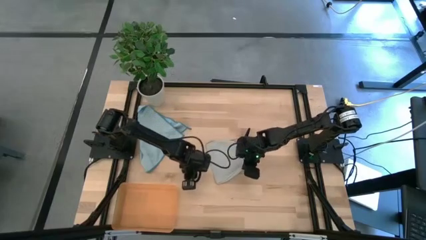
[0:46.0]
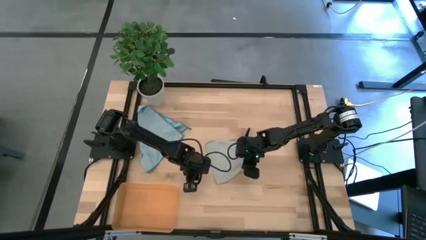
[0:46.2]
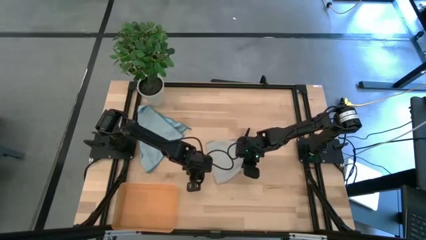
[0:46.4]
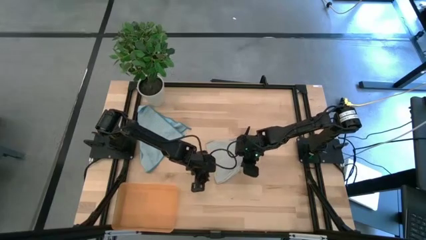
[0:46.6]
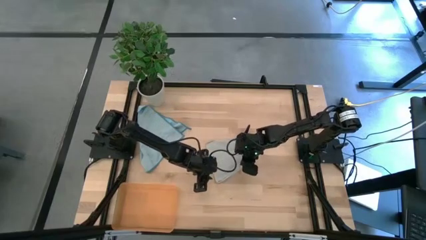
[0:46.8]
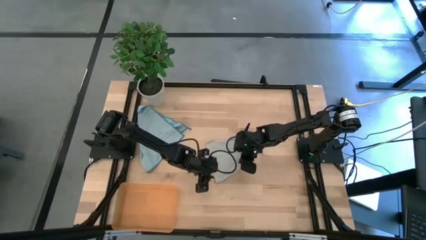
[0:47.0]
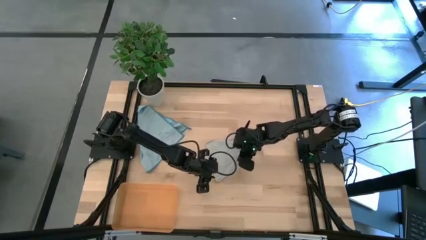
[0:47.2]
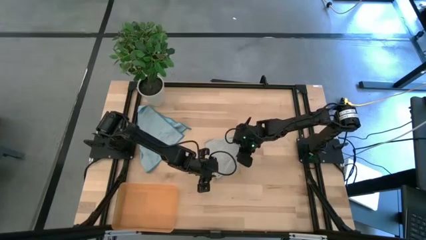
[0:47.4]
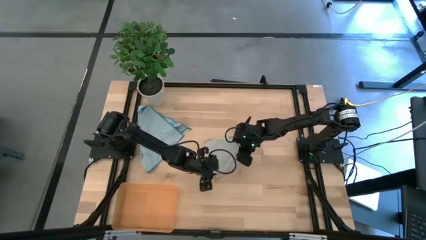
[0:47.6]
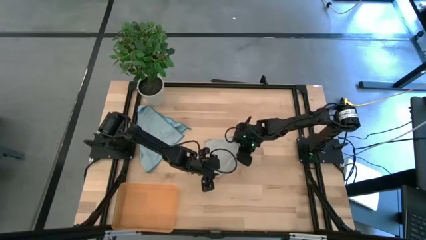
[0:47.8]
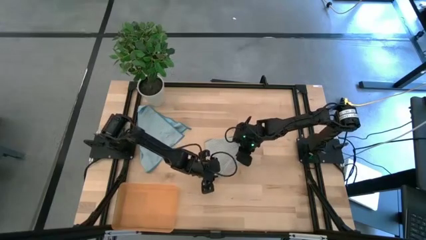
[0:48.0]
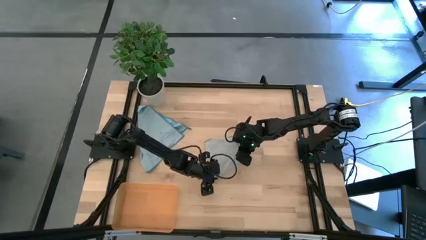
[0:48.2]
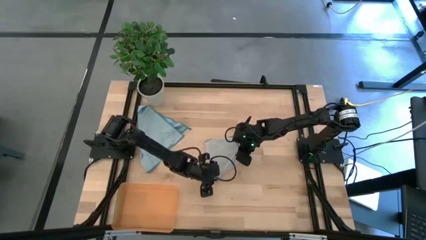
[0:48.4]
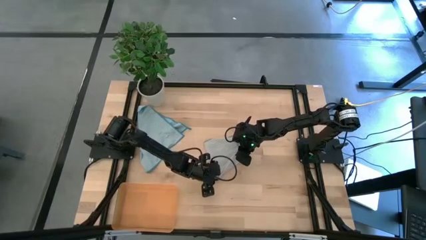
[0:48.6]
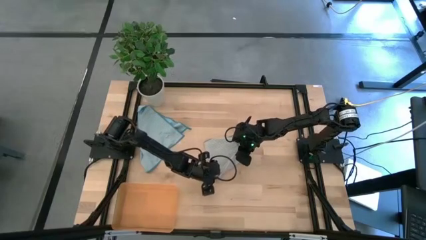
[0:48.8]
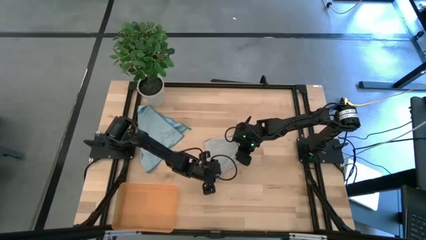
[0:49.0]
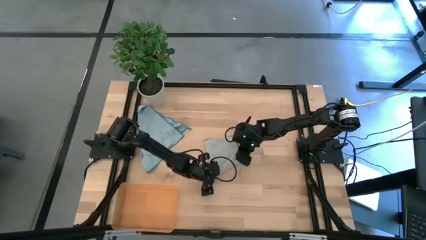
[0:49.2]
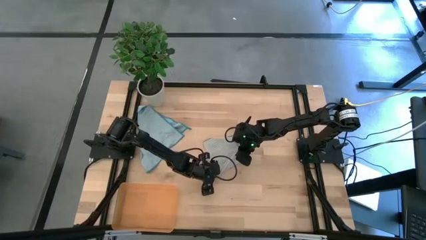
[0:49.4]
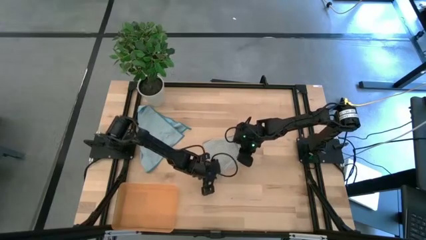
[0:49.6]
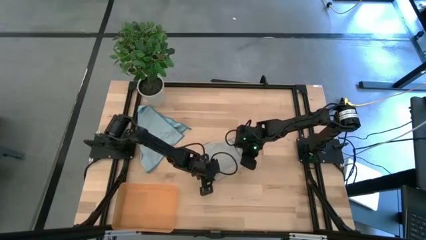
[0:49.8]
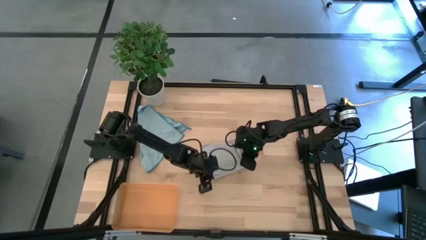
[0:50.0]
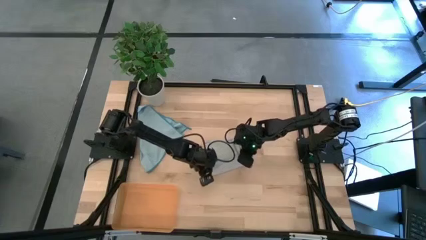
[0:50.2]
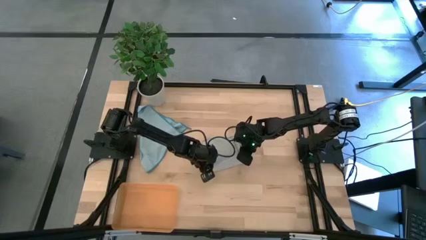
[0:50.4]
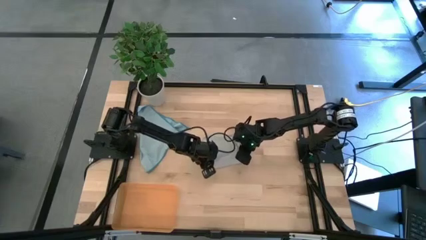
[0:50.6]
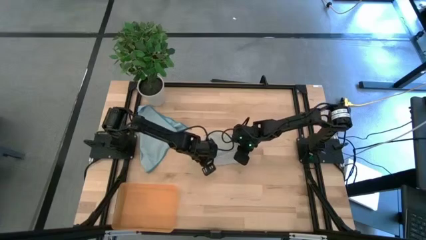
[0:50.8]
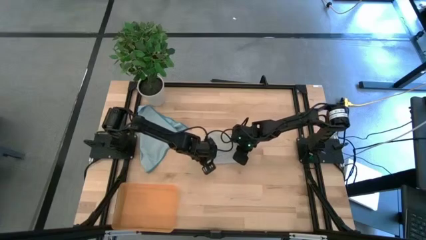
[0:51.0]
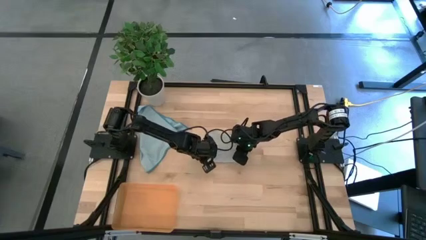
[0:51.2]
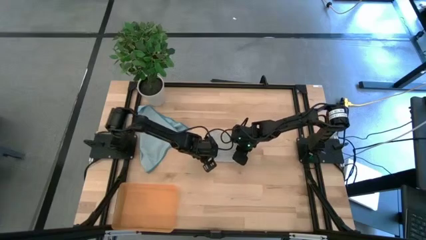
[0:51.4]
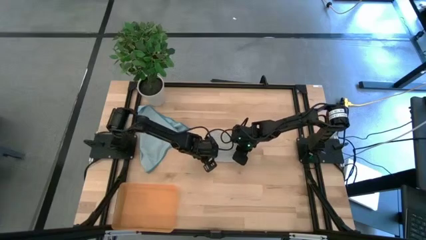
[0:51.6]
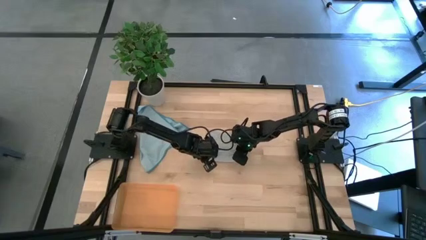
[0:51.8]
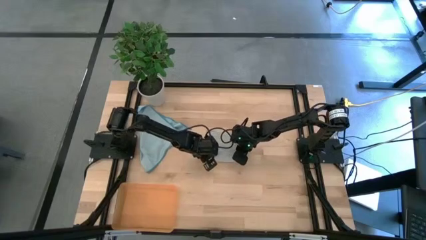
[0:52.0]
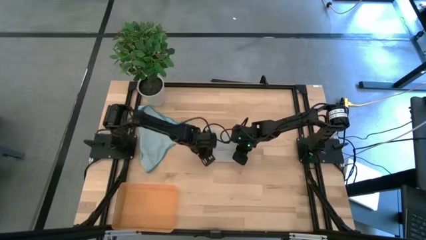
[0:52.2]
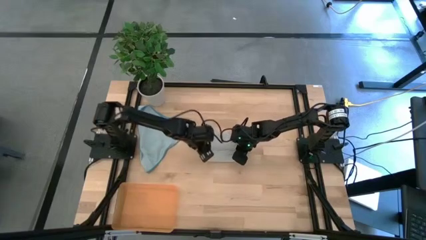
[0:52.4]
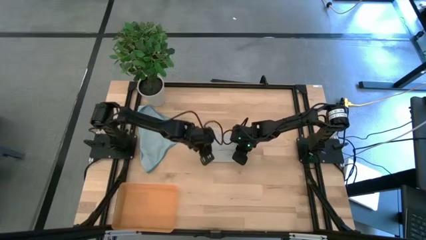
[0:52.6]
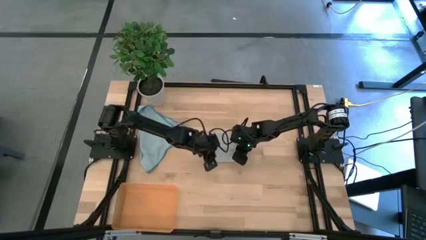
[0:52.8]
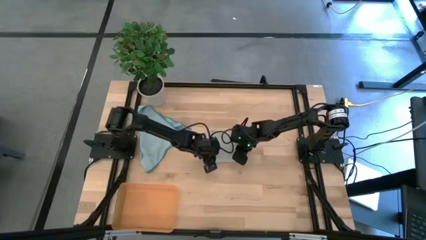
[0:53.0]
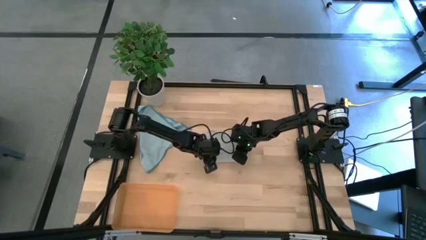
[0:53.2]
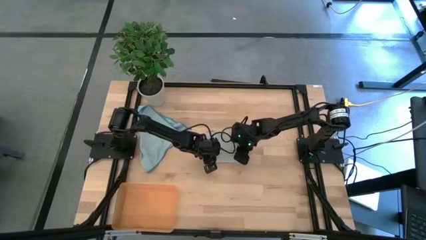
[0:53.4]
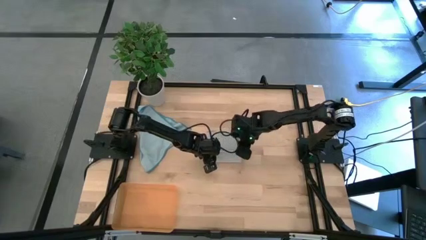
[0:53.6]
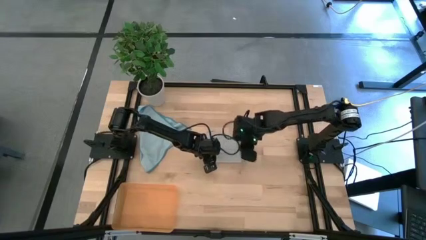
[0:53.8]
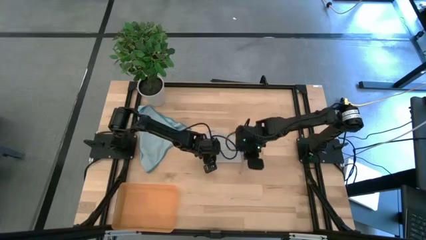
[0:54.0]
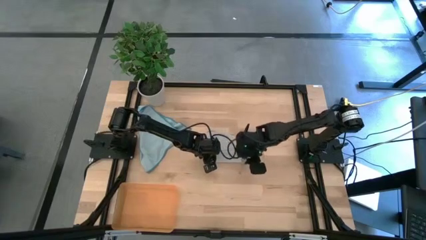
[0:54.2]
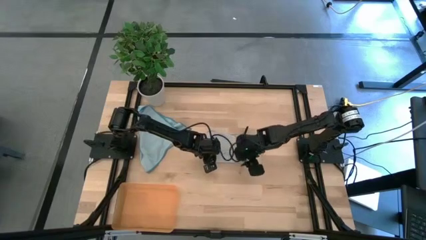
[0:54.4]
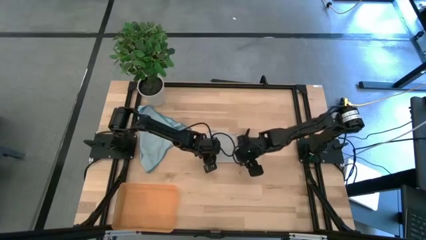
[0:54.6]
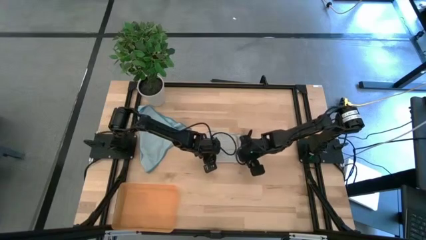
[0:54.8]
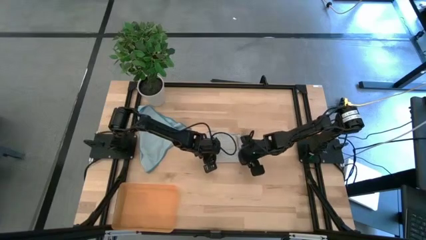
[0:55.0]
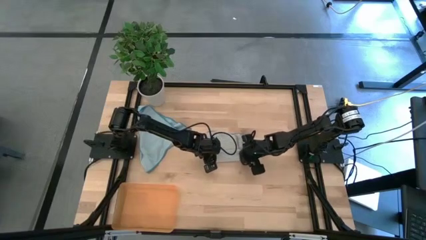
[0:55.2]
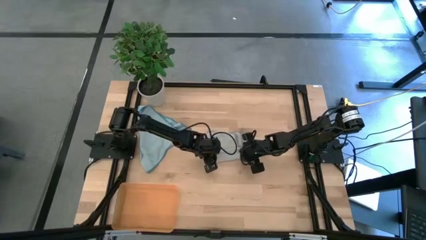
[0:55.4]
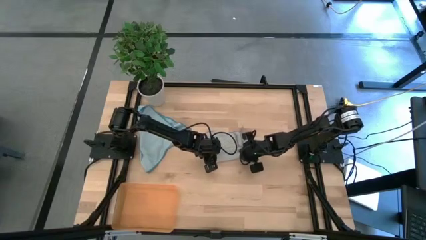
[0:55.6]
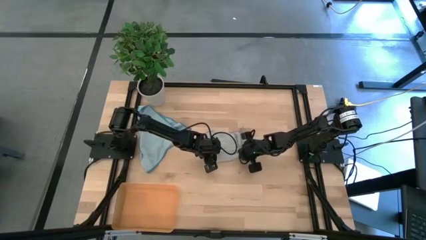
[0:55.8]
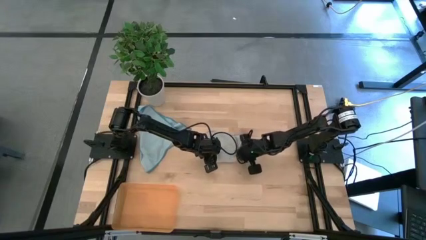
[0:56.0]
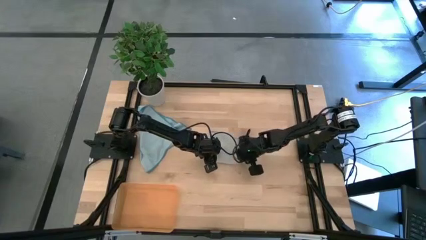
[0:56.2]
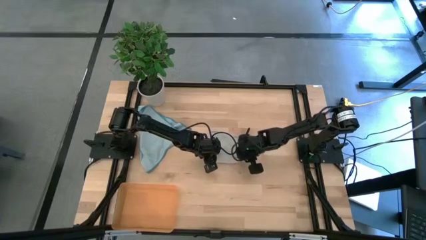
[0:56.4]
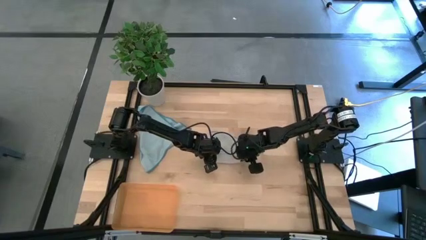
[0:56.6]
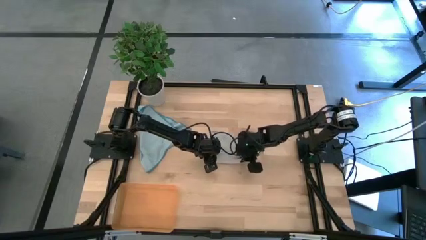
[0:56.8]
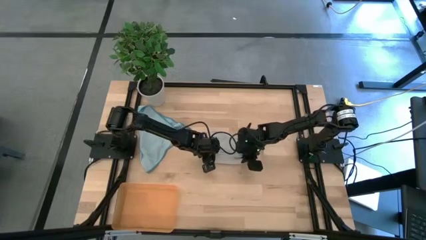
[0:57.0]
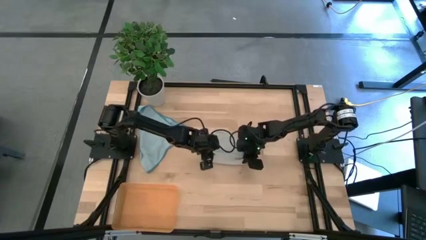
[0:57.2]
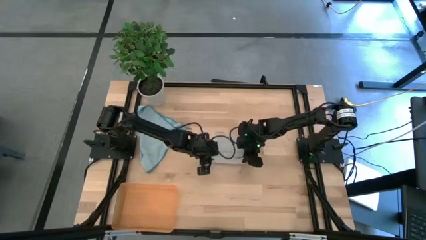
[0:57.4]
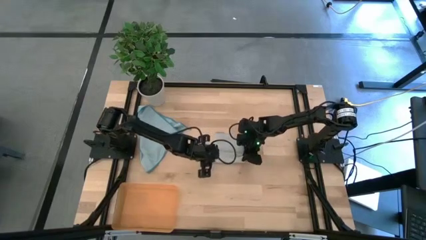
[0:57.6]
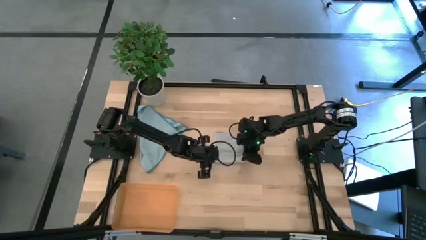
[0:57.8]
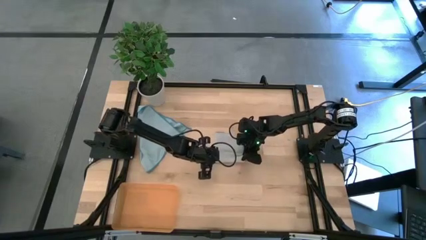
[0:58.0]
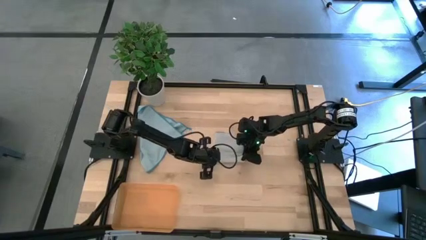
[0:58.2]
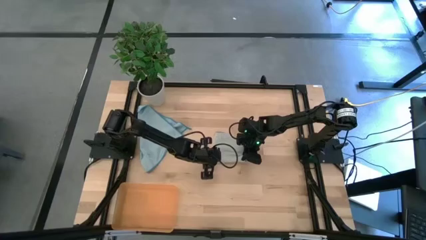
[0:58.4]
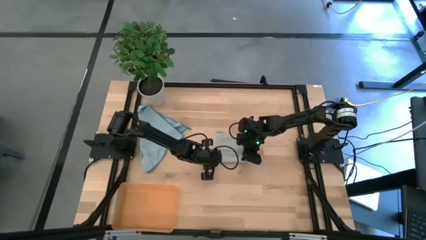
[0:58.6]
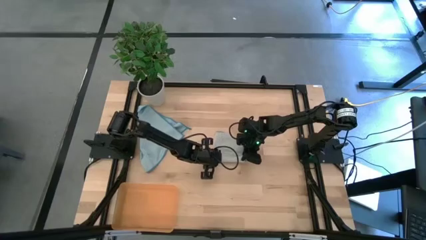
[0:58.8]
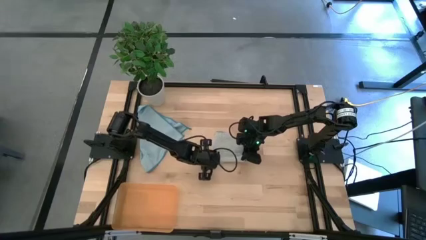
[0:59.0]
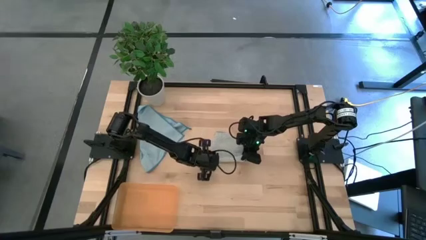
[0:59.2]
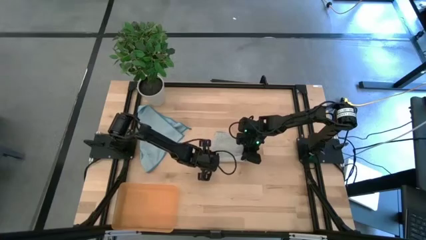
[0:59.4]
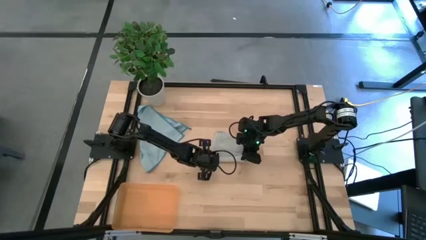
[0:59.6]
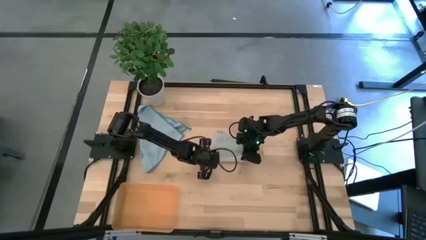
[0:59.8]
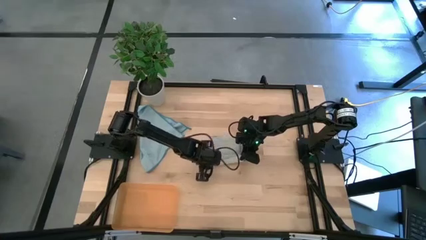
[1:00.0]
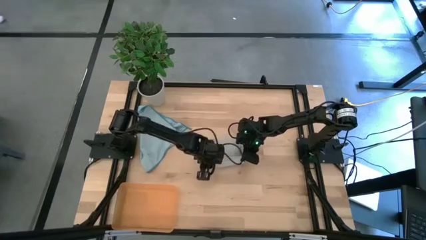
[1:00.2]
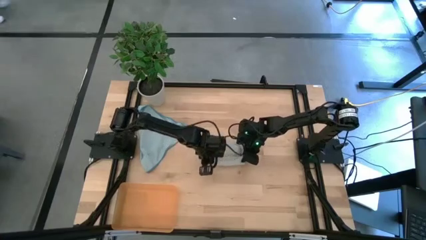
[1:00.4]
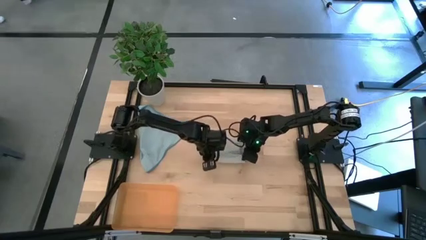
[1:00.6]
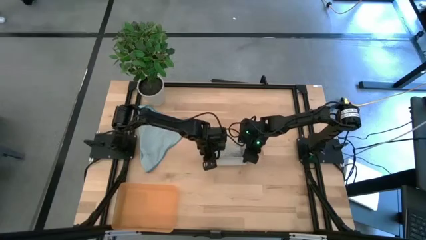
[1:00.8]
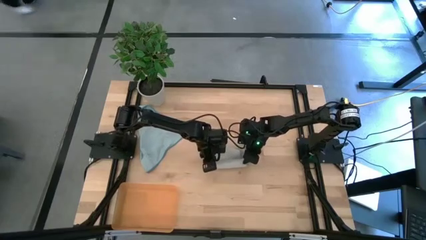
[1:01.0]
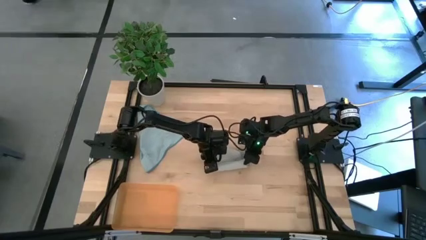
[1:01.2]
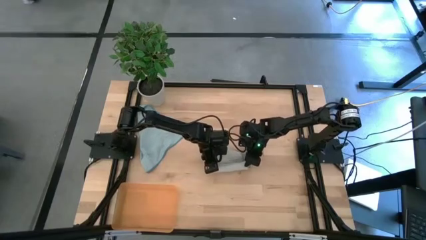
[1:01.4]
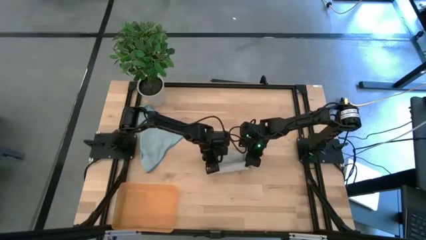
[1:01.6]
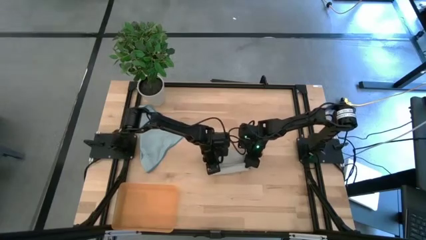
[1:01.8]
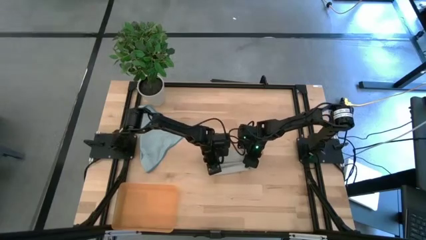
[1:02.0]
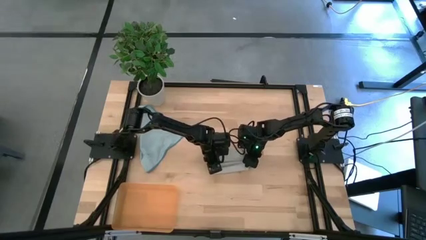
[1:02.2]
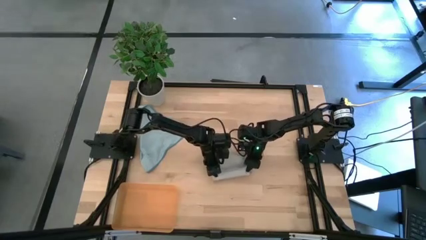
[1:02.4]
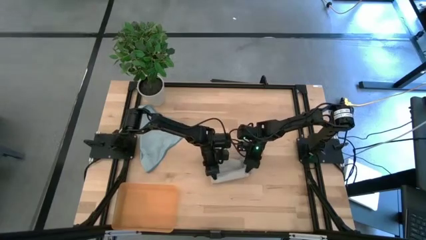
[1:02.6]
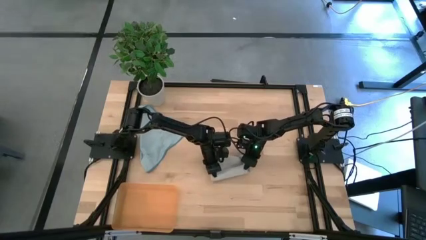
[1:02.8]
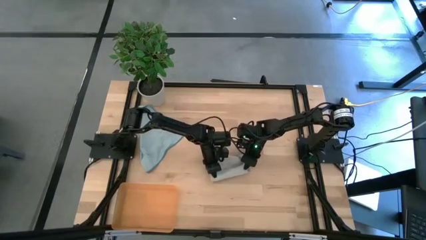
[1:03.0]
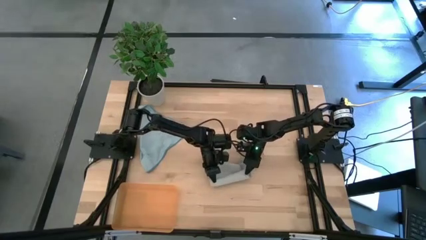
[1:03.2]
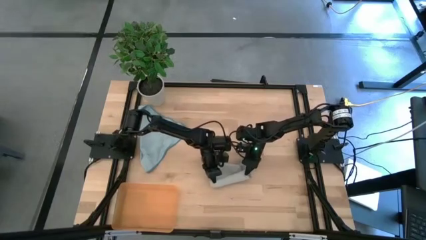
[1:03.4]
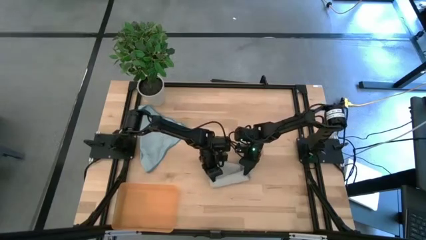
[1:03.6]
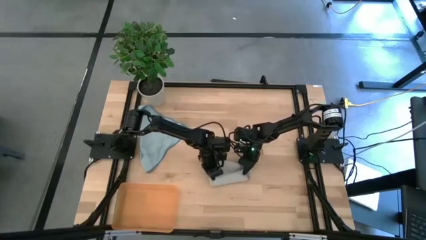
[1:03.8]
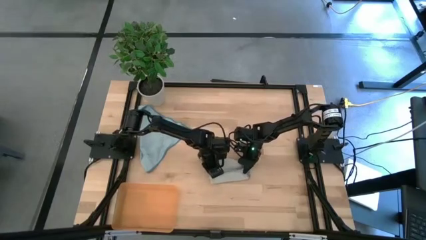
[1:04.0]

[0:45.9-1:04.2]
Task: Roll microfiber towels into tight, uniform cylinder then place into a basket
Roll the gray microfiber towel
